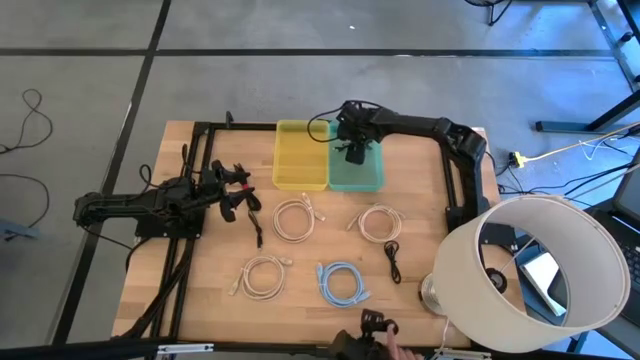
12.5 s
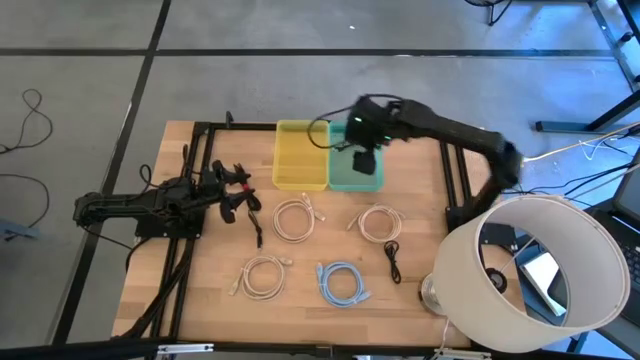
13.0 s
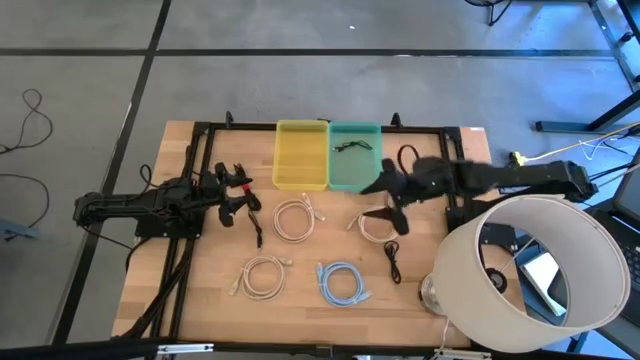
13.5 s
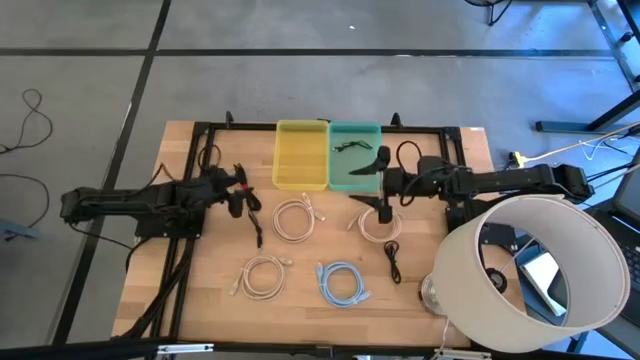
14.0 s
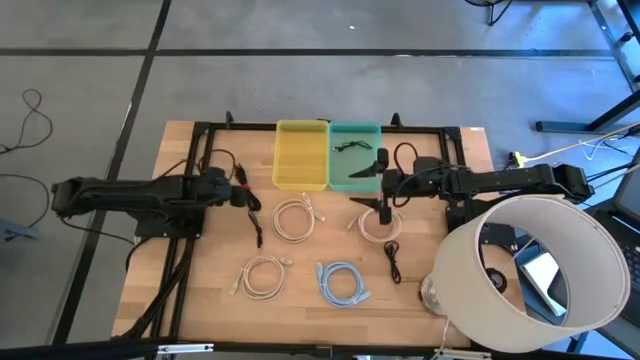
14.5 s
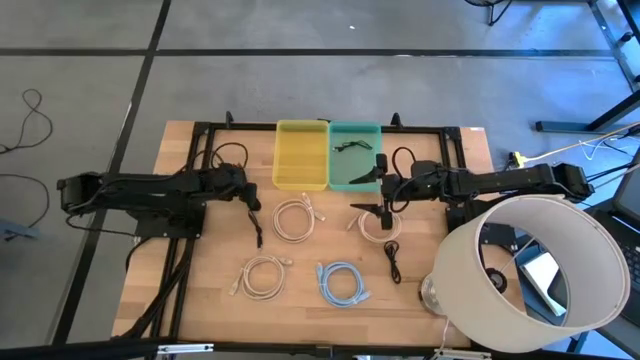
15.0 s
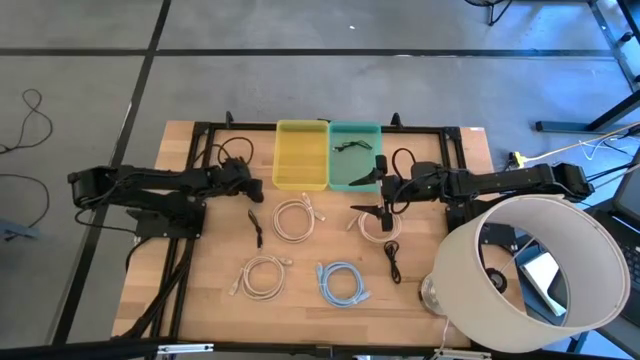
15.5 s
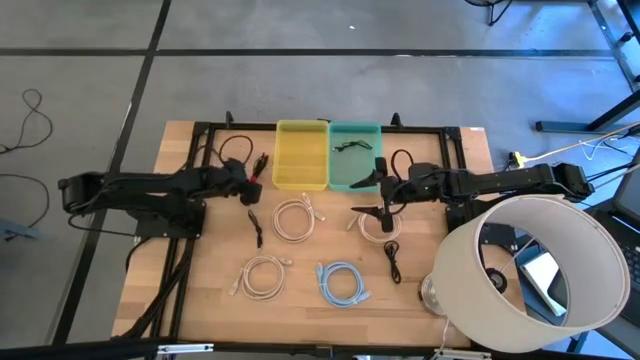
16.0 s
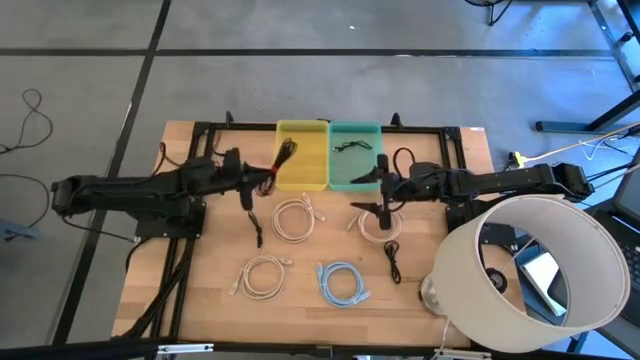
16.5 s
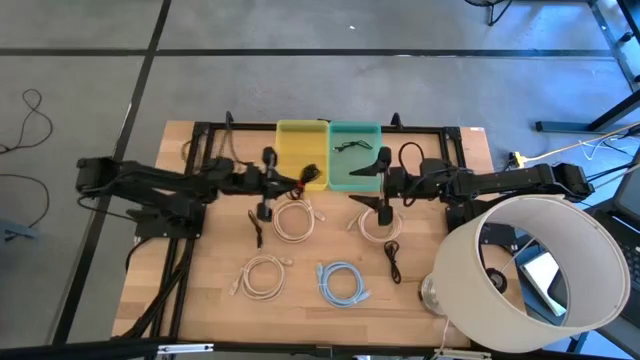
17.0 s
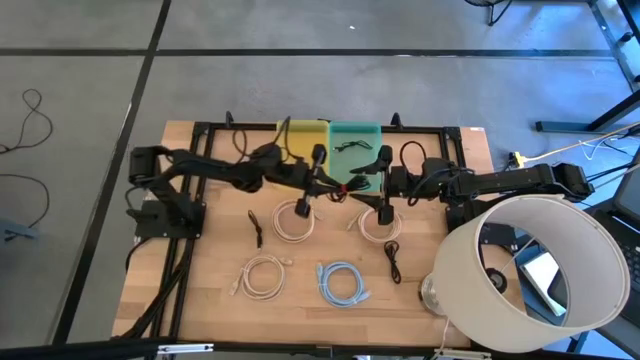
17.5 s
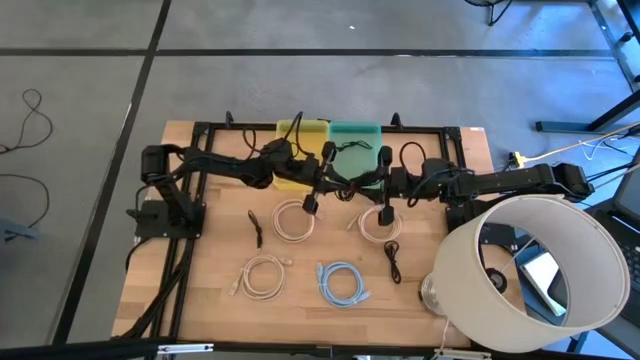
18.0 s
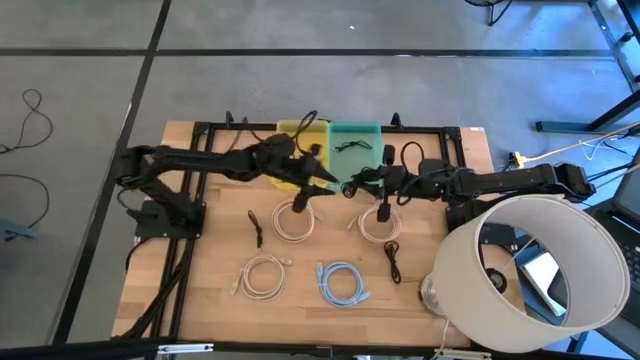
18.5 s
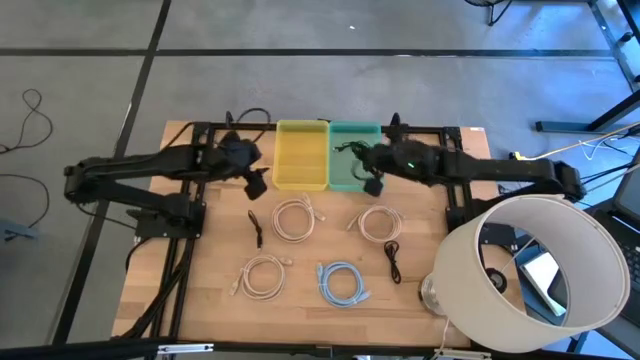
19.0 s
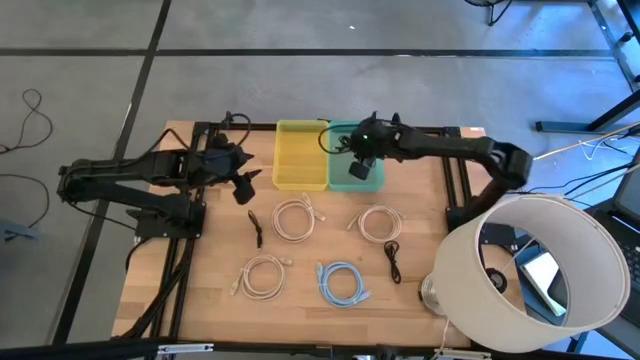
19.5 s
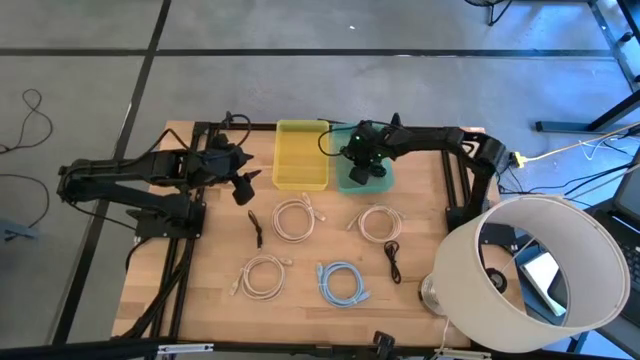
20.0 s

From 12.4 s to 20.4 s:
Put the black charger cable into the green bin

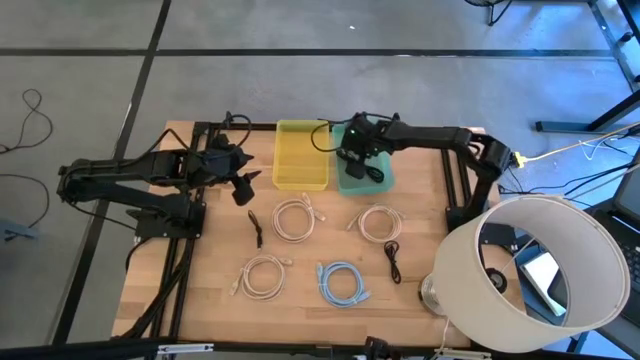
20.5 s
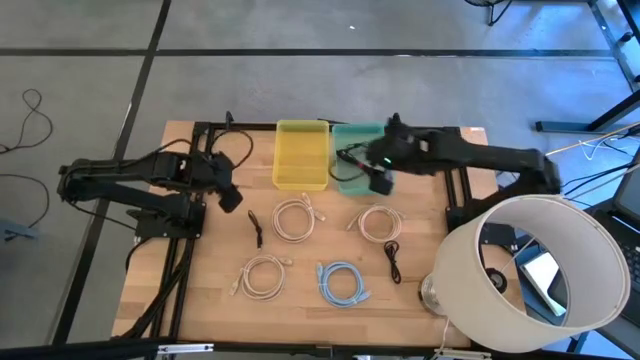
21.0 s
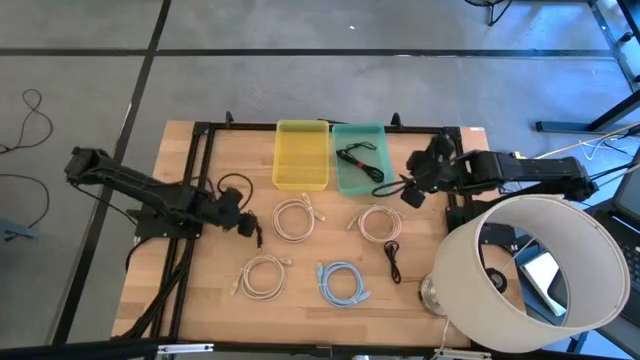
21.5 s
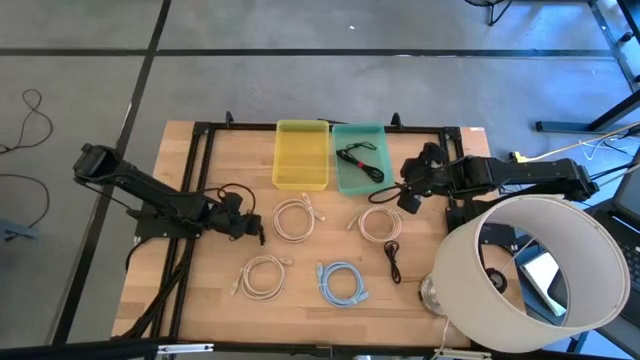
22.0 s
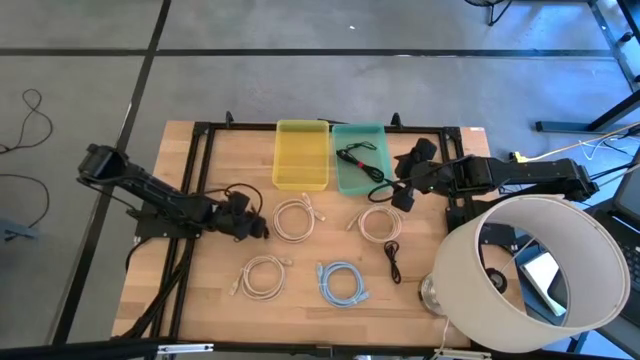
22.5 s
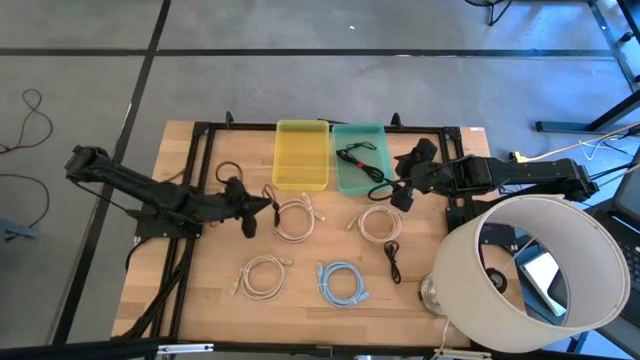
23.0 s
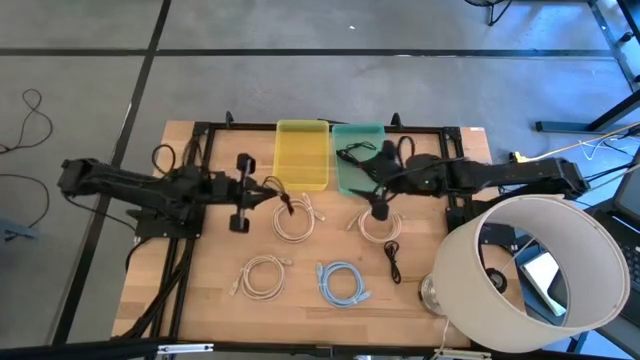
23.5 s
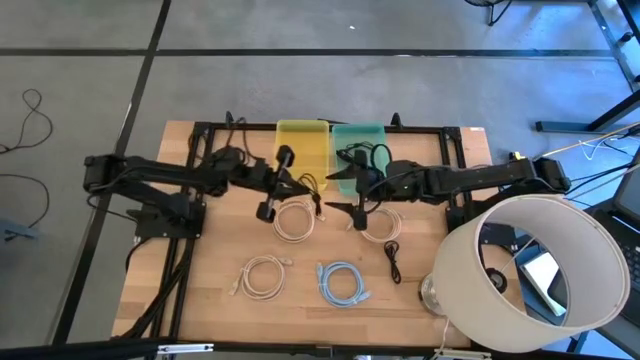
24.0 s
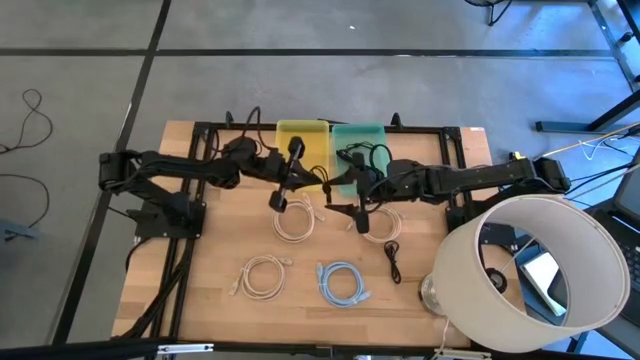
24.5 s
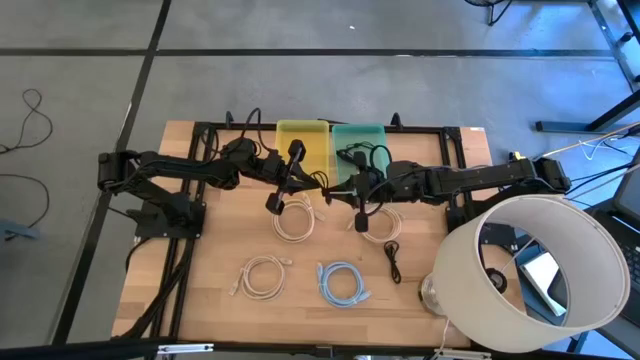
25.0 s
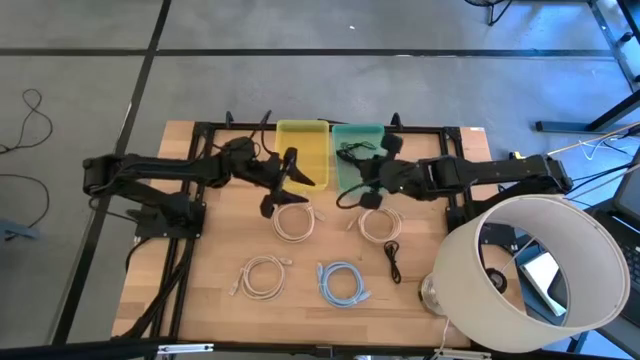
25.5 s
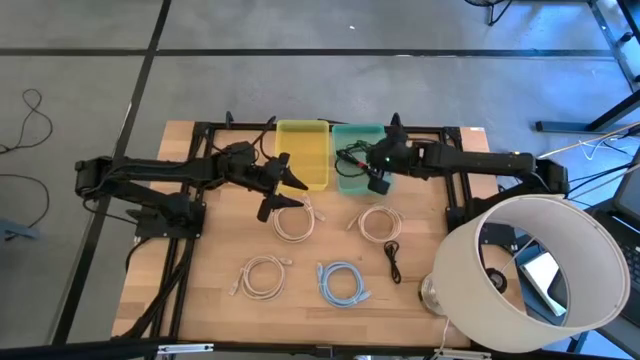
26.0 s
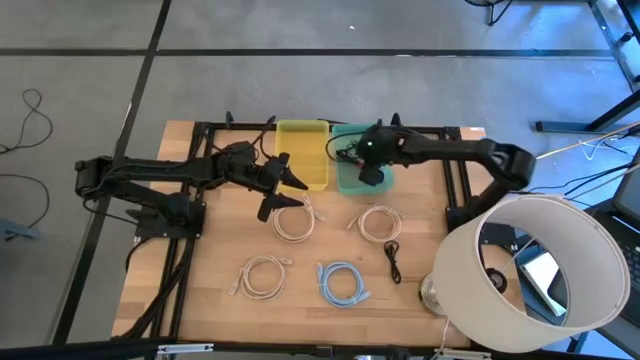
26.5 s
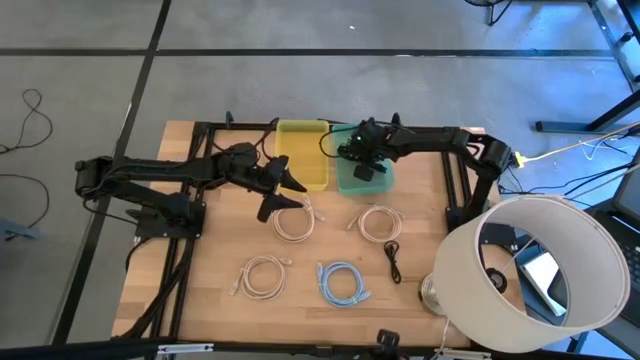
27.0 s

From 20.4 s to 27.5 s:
Put the black charger cable into the green bin

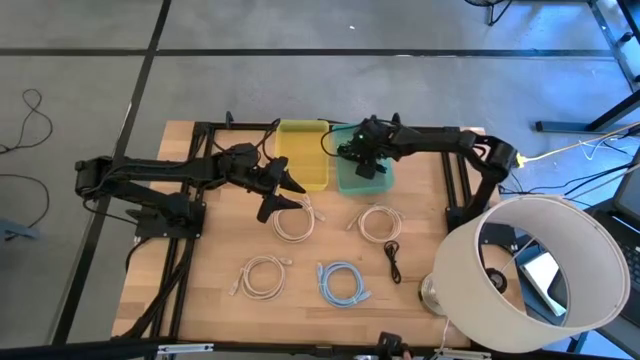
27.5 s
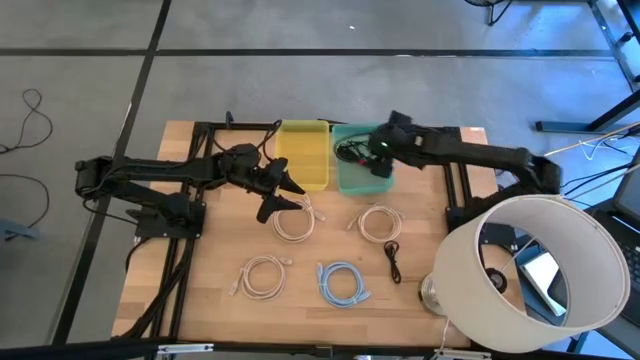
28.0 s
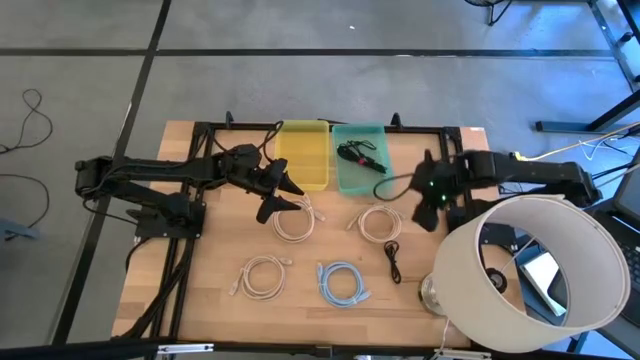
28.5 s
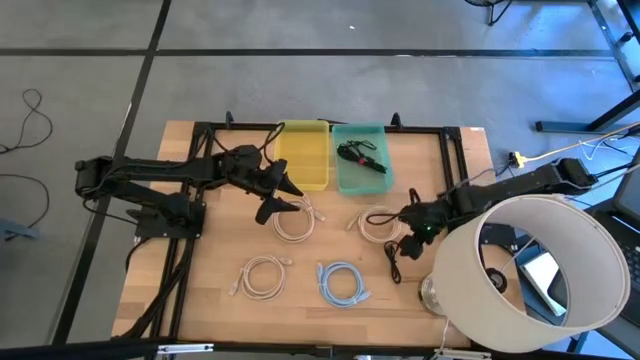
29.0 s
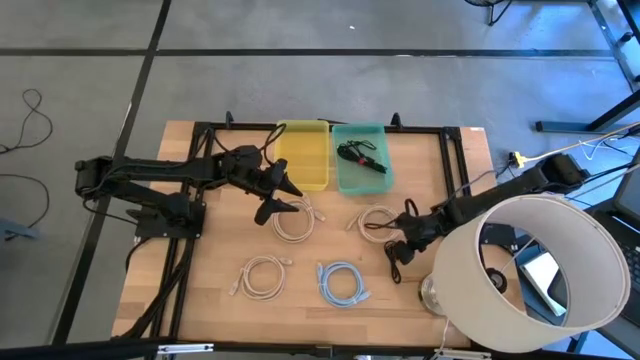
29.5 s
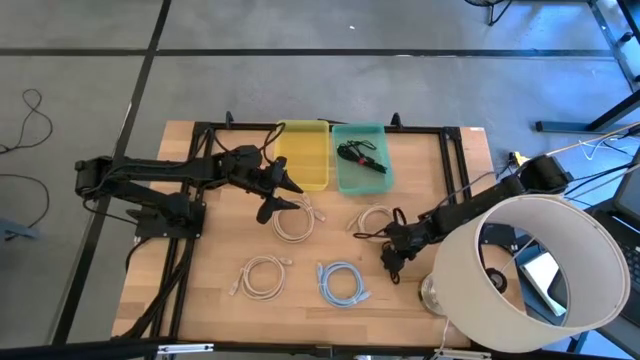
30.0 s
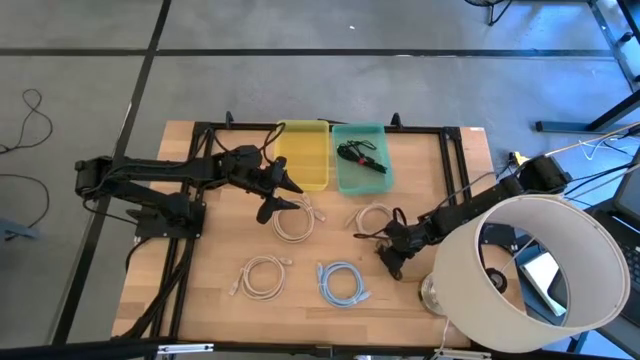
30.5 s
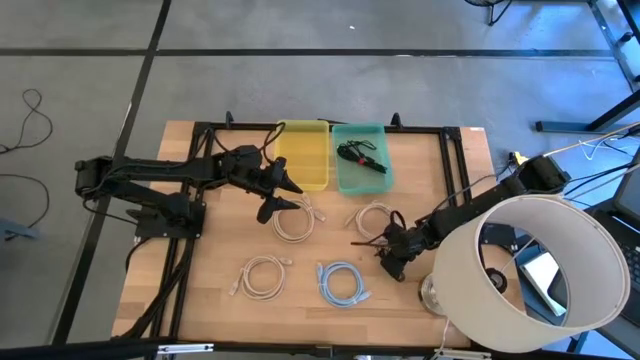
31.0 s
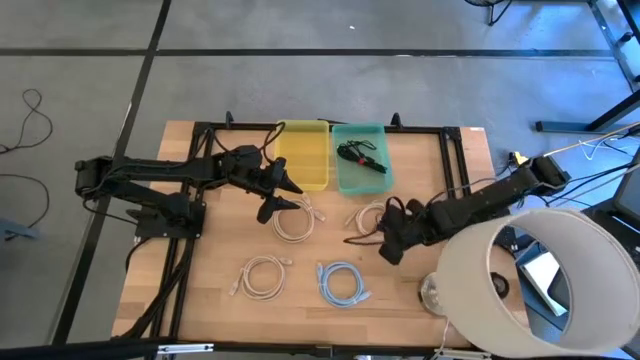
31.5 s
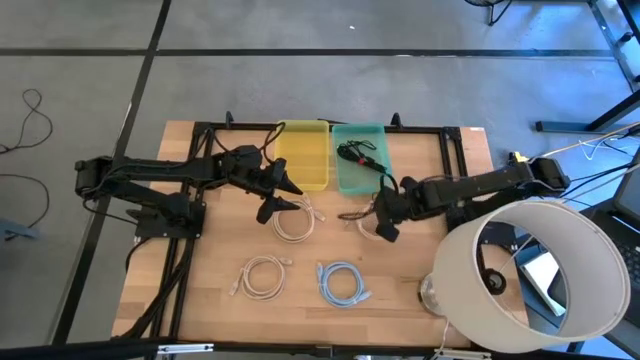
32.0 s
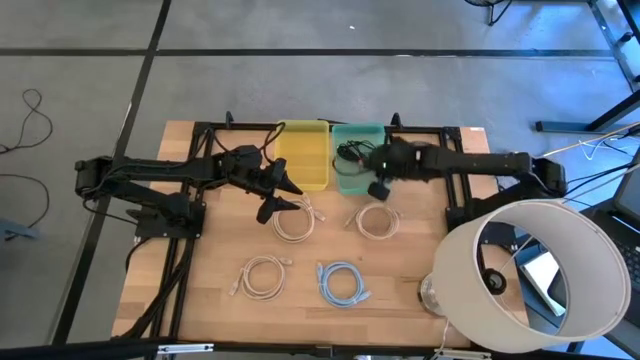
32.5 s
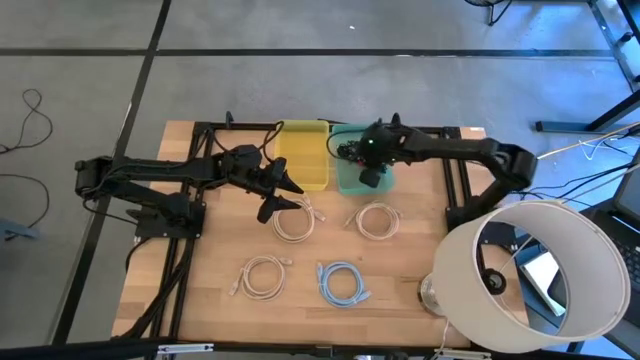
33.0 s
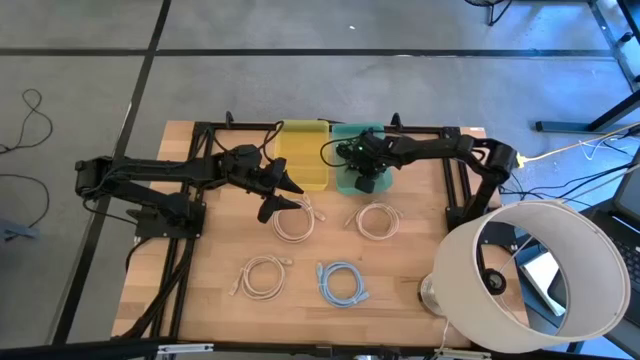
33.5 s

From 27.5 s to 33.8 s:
Put the black charger cable into the green bin
